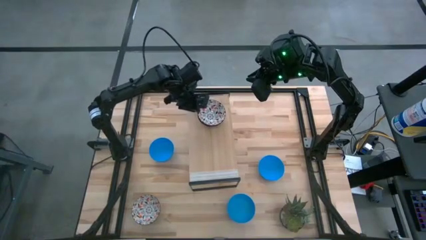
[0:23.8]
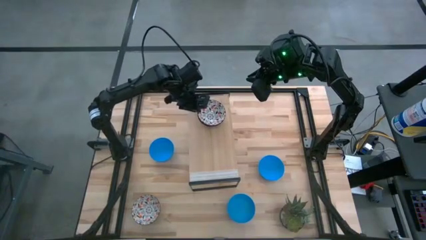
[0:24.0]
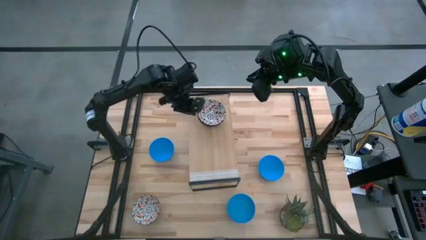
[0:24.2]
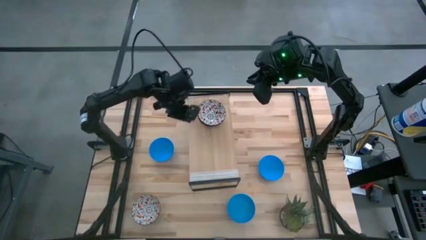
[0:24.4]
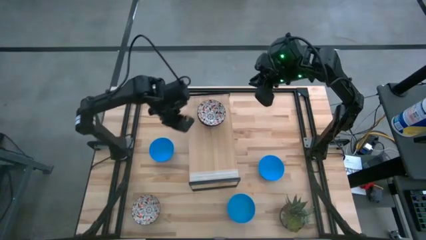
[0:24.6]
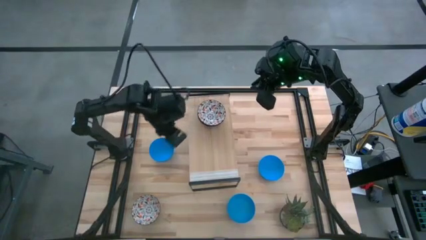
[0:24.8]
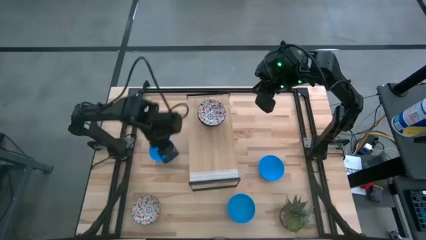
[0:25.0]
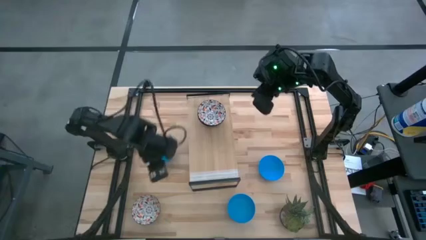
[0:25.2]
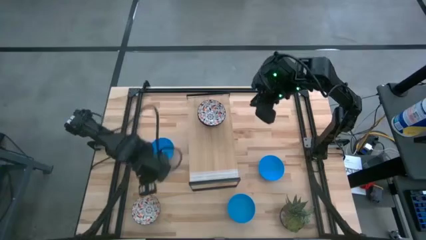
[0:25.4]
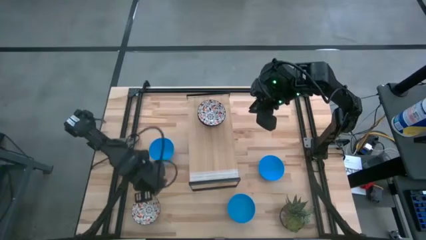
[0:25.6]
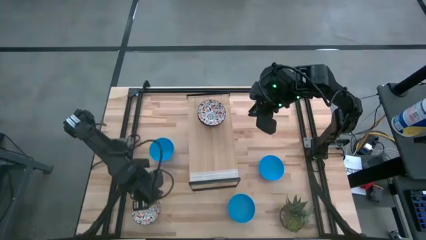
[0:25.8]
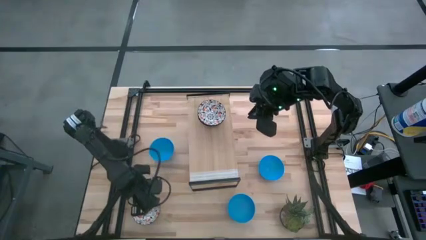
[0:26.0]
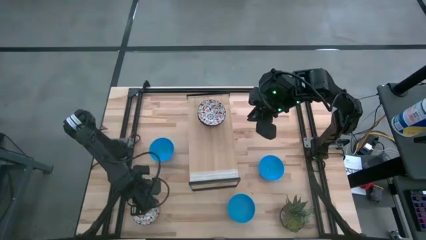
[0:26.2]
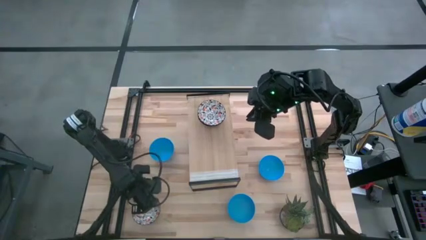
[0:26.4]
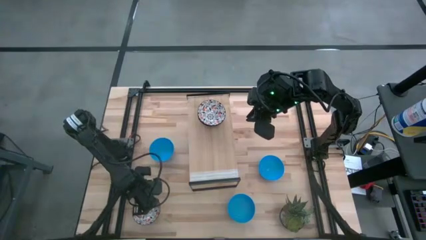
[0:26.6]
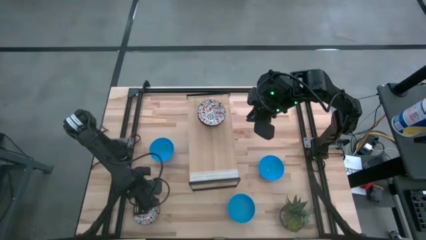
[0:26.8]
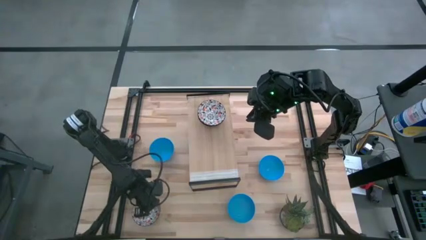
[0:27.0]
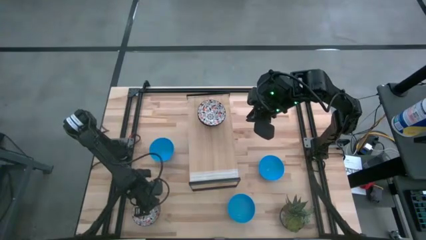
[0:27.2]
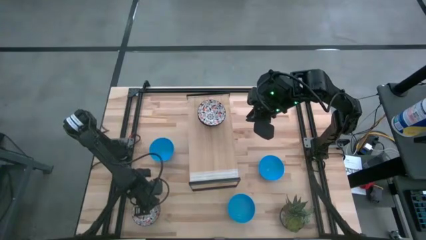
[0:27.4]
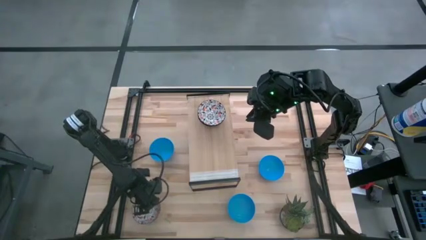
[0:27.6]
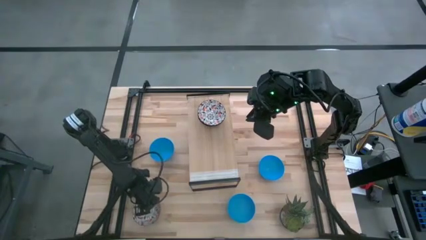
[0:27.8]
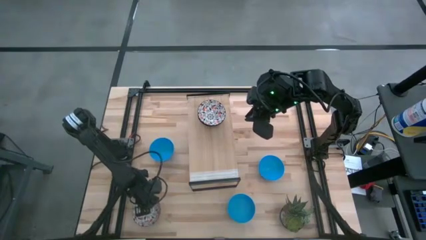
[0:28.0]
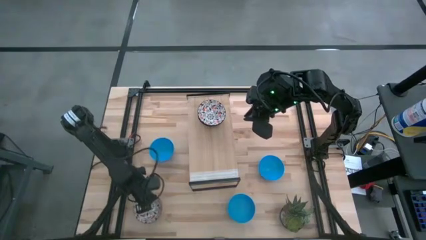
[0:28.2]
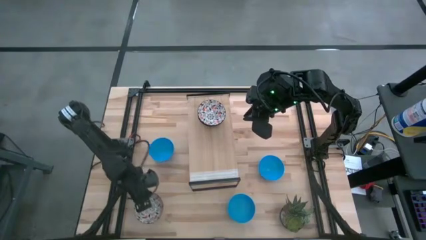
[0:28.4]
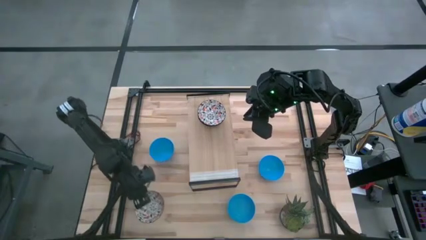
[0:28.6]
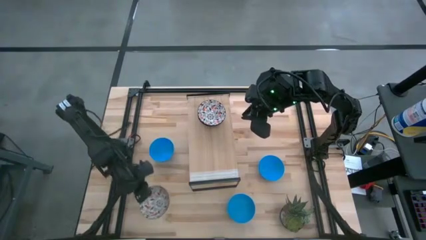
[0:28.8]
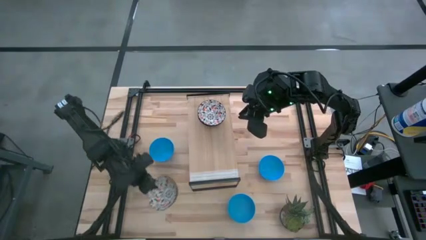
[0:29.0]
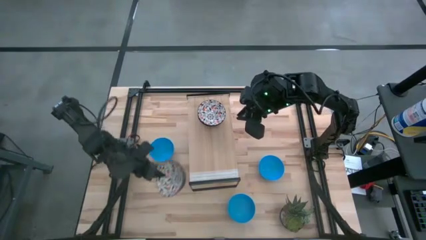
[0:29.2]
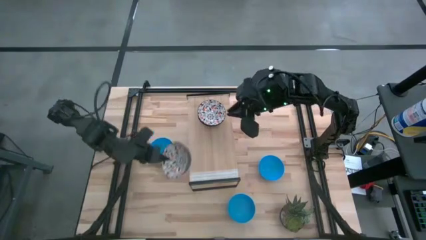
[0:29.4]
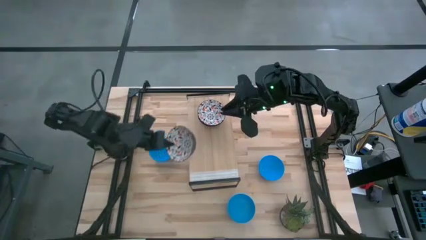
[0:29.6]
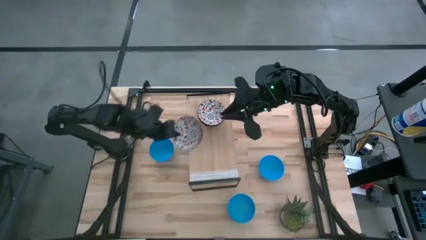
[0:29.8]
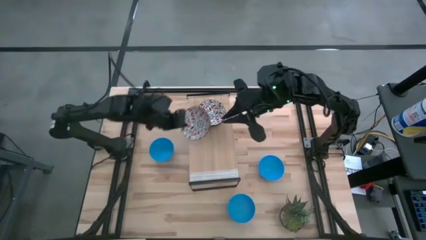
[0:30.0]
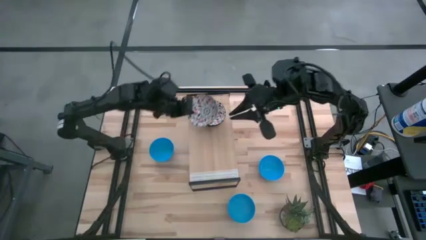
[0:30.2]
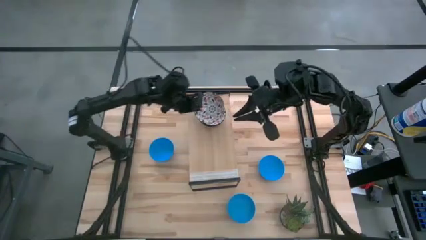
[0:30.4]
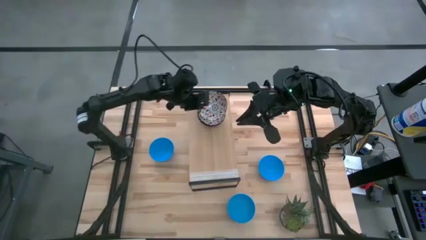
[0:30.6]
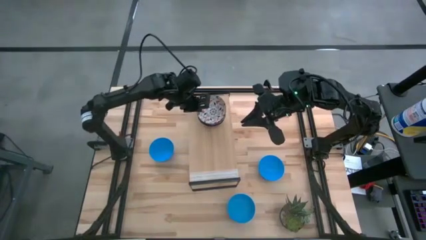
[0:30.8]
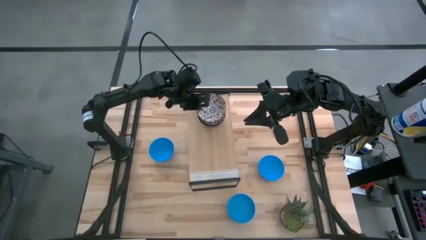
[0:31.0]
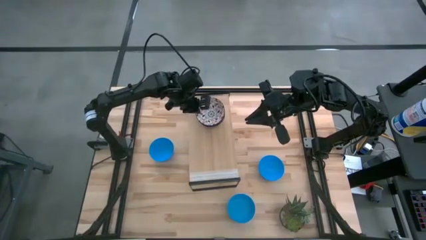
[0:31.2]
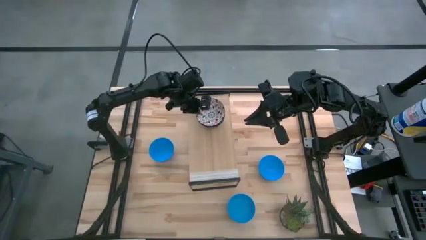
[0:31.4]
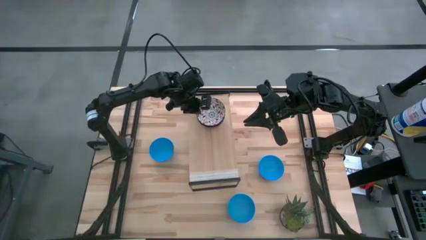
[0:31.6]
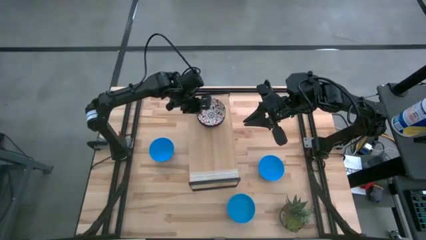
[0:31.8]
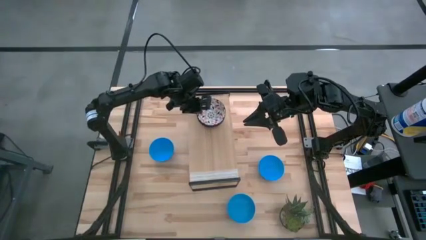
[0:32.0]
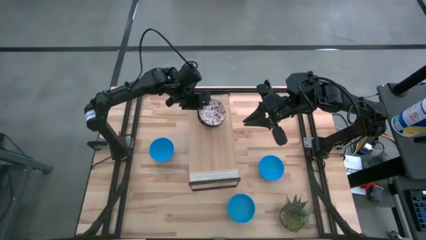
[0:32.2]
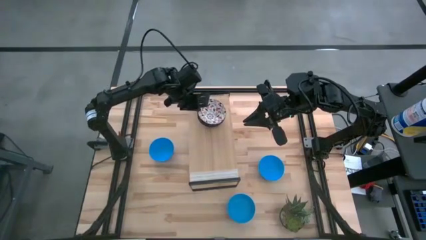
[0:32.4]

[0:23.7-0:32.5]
Task: Pick & Place Mini bowls
Stack the white patterned bowl on top of the stacked white patterned bowls on the shelf

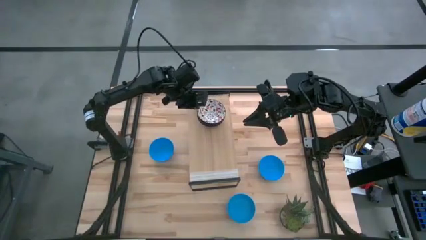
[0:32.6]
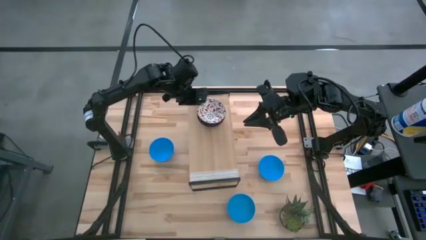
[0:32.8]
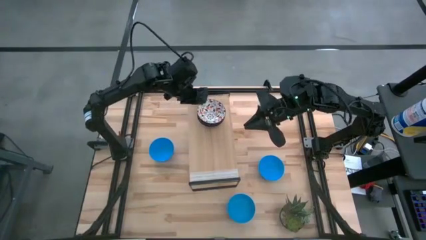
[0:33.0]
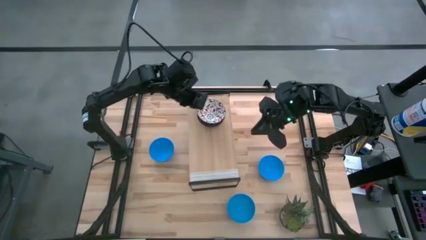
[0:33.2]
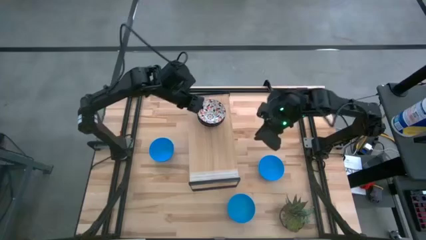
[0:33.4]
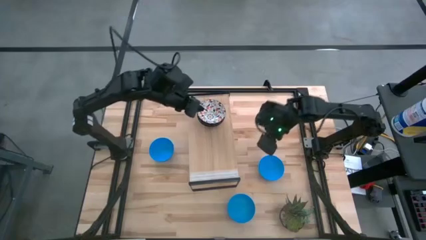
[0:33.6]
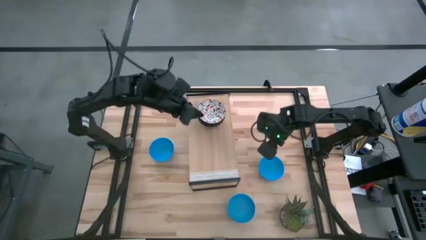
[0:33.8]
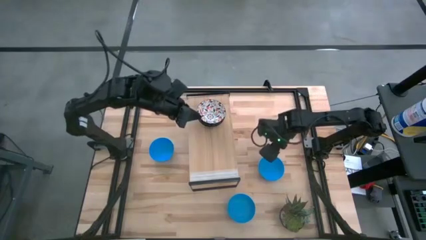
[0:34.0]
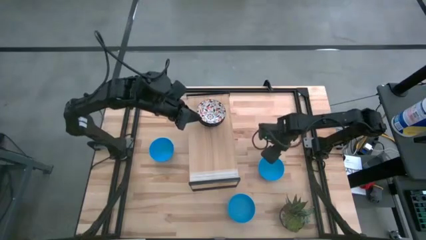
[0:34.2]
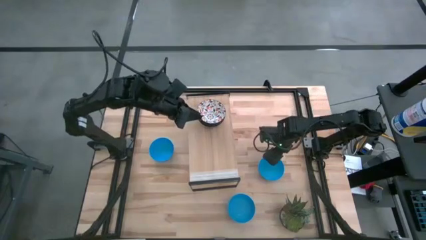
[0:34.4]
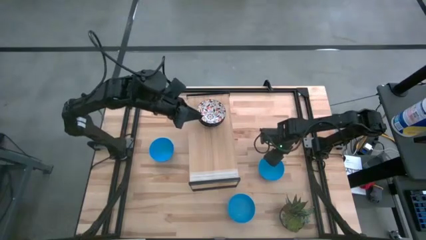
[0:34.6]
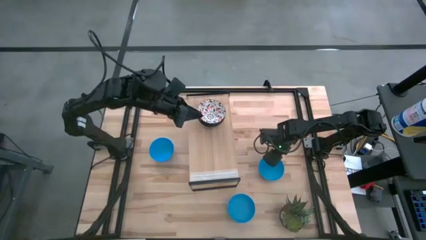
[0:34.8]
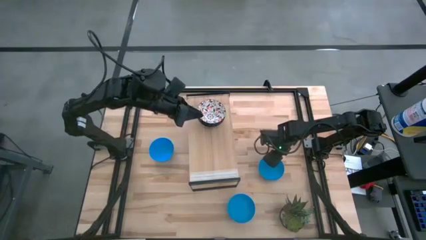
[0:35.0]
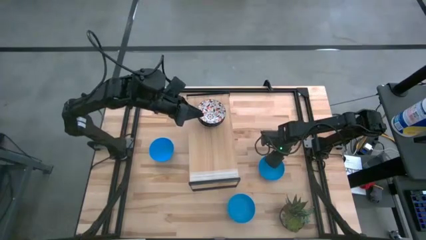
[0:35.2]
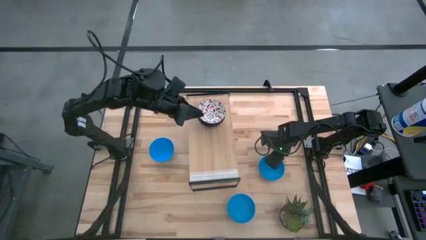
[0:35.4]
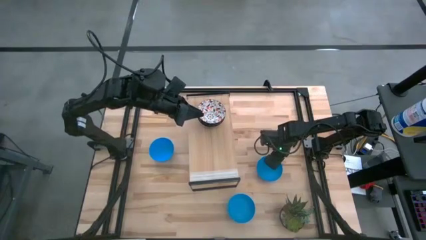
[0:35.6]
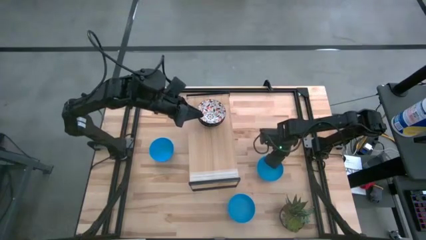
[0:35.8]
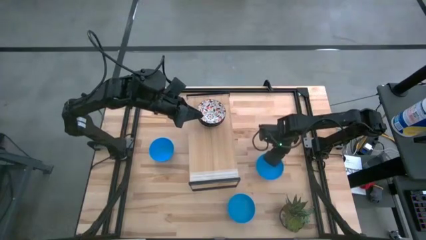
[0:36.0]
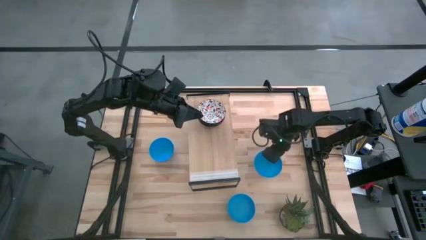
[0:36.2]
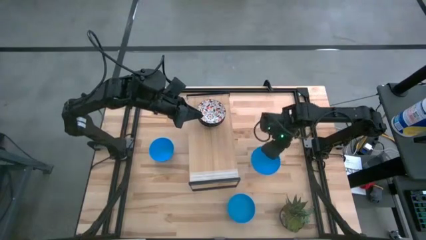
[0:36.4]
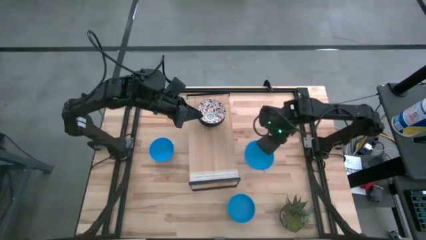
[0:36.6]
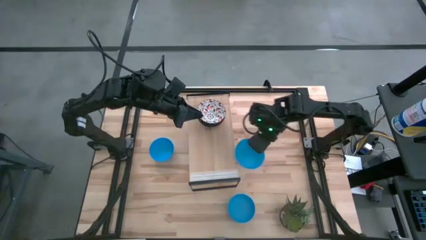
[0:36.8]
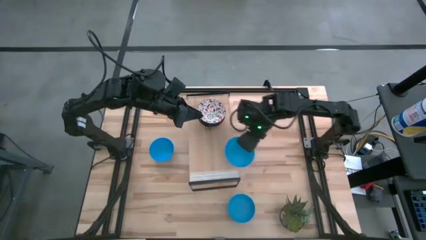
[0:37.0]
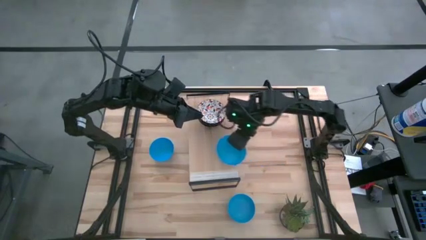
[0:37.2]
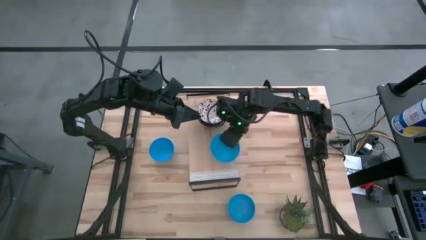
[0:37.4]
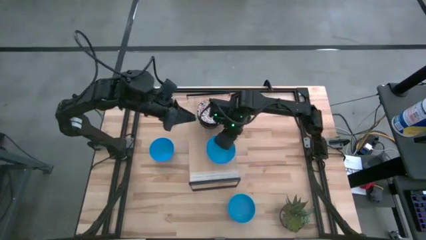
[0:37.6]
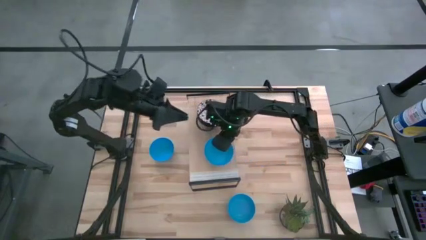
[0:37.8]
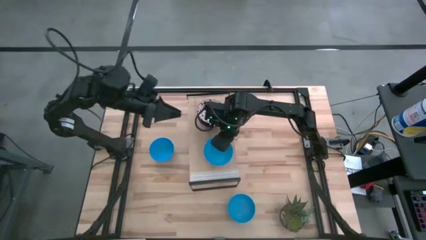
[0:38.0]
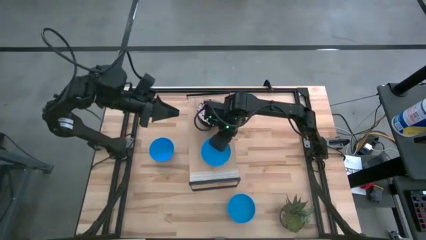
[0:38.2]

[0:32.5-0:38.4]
Put the right blue bowl on the shelf

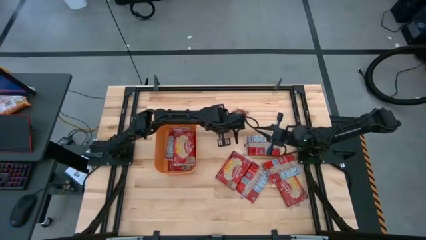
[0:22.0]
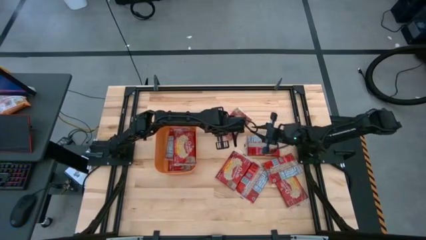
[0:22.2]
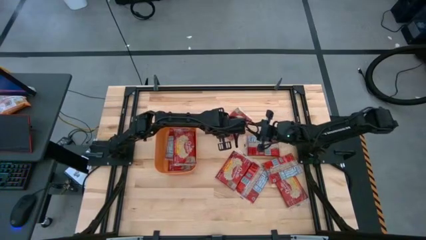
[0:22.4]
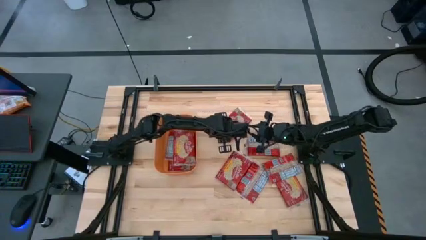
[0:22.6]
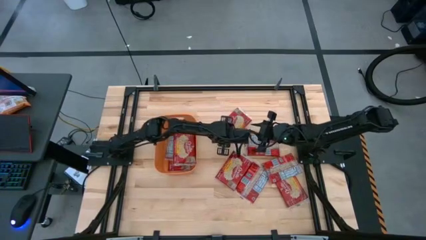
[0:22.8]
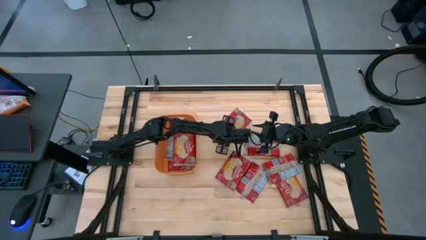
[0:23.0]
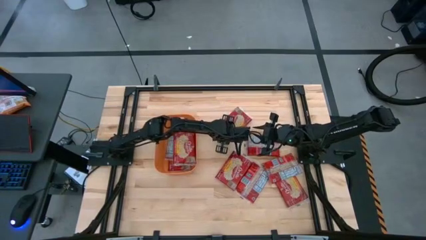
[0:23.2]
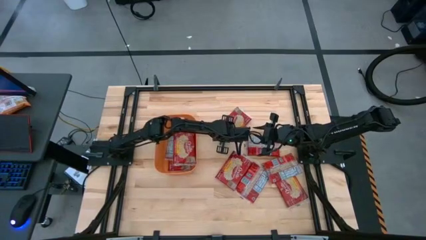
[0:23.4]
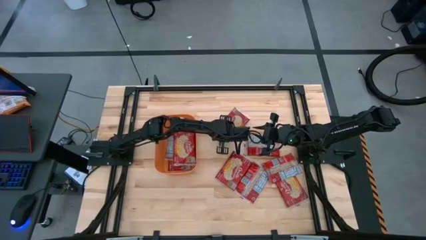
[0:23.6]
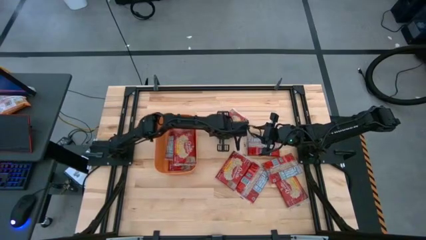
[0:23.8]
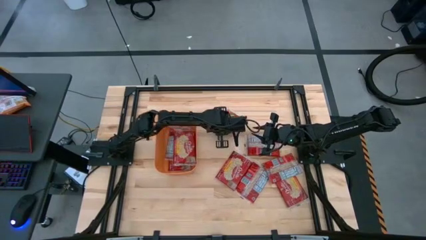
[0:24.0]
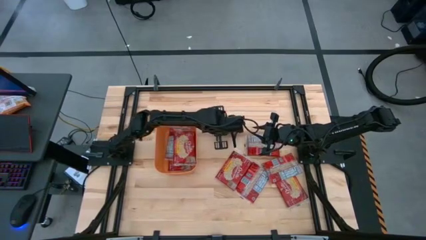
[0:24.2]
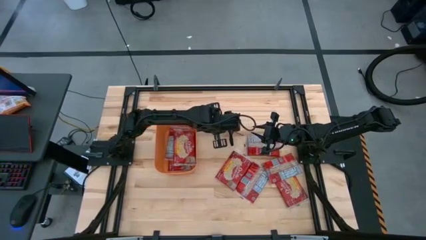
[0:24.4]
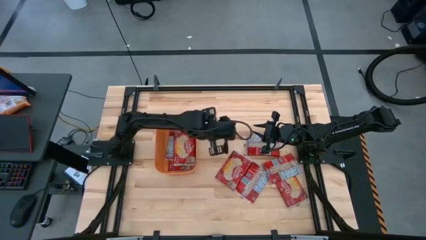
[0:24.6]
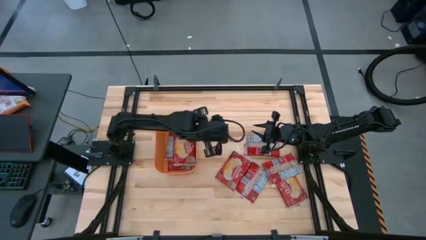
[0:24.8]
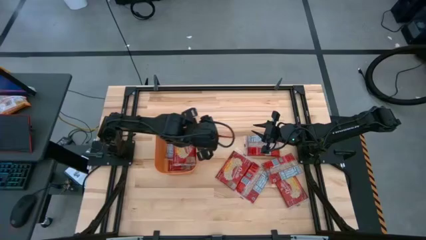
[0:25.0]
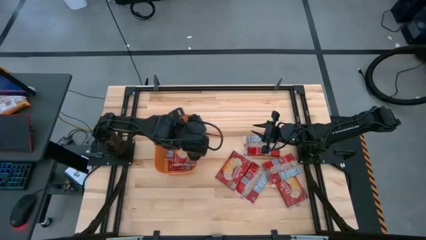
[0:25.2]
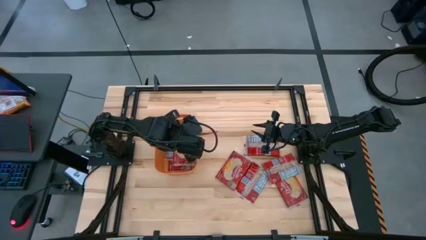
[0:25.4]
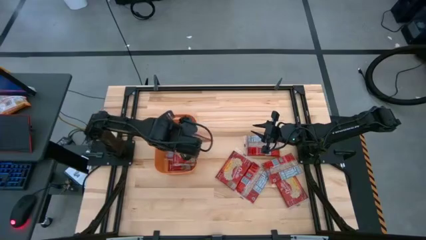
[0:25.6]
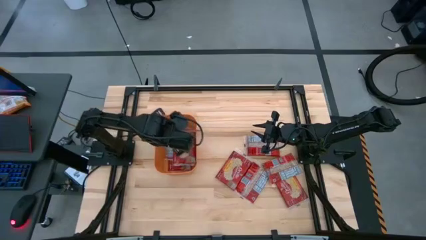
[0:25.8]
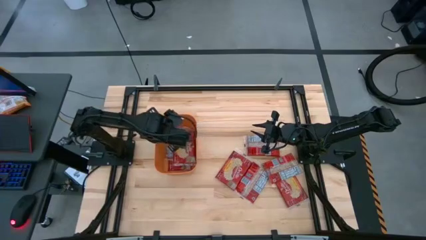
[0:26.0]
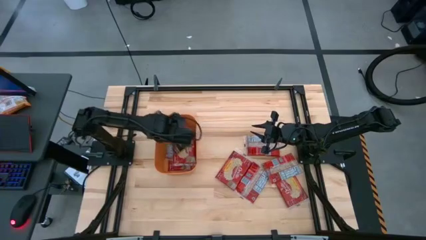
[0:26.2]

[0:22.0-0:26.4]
Task: Sort popcorn bags into baskets
Put the popcorn bag into the orange bin
